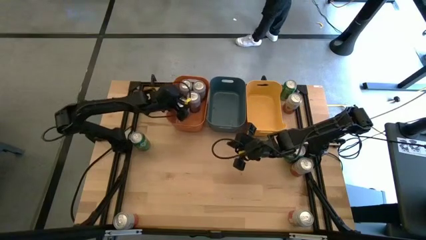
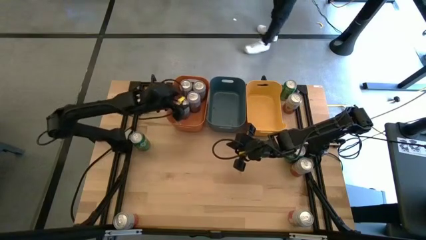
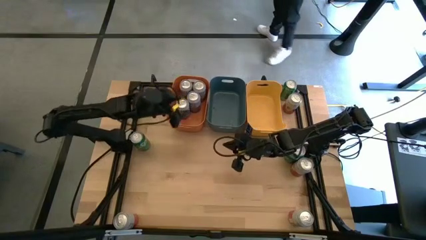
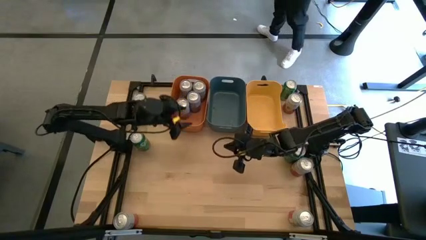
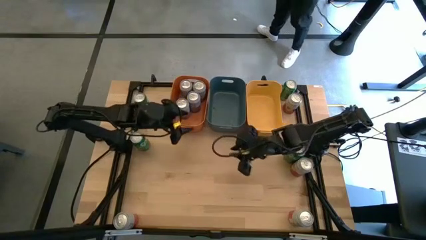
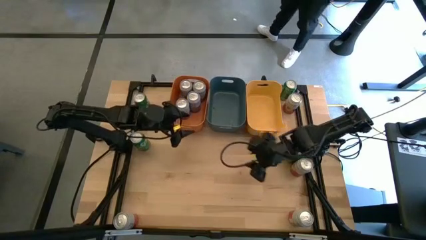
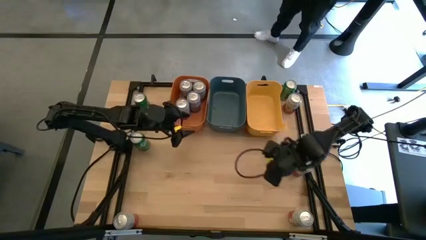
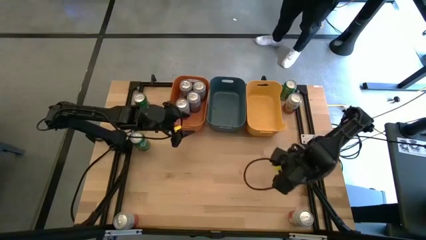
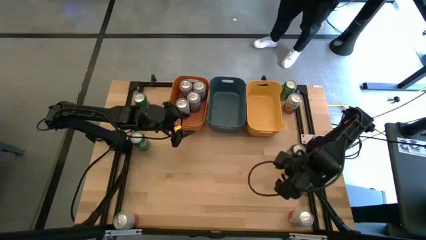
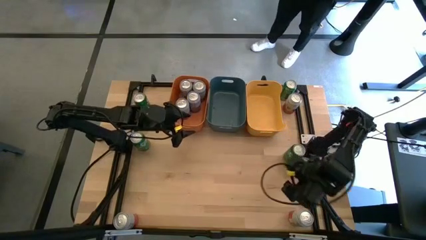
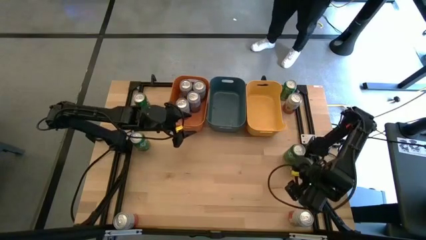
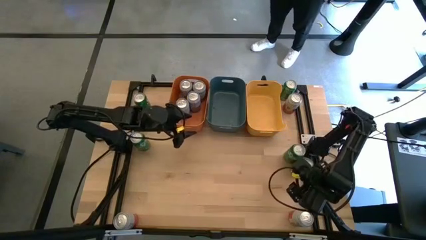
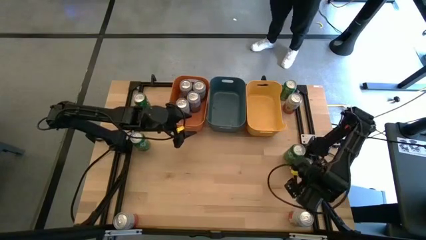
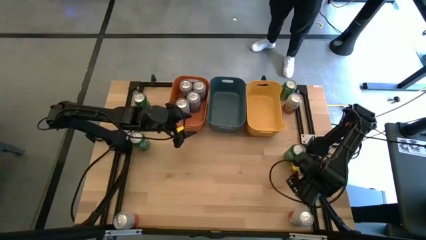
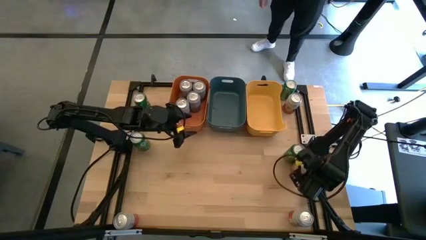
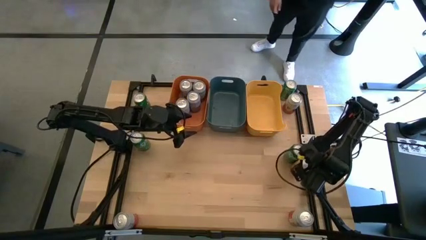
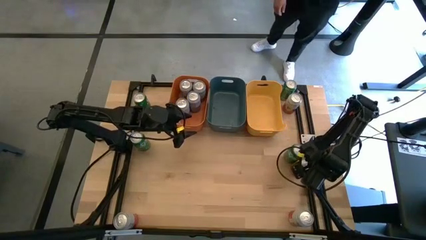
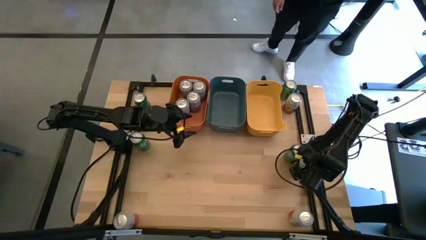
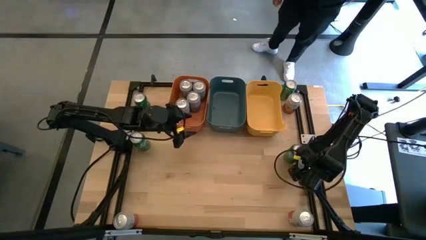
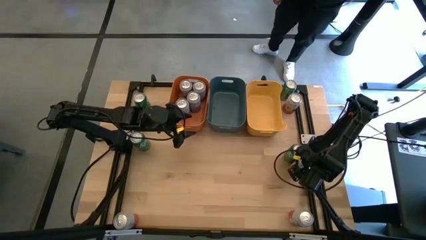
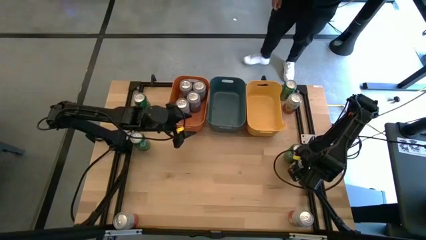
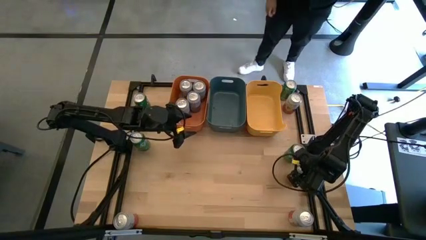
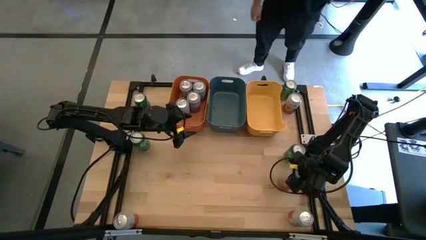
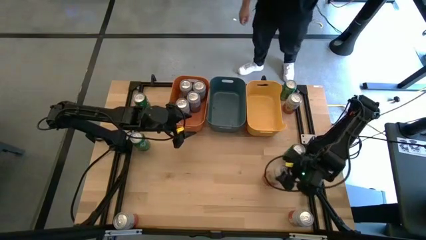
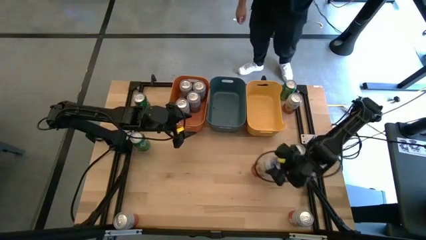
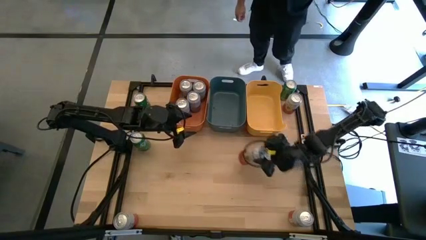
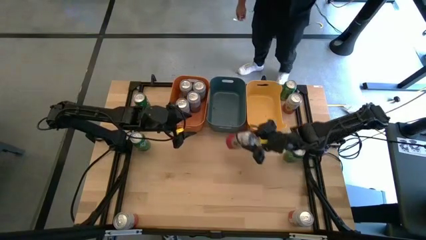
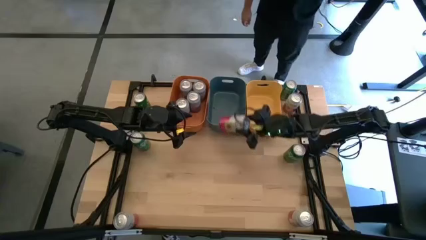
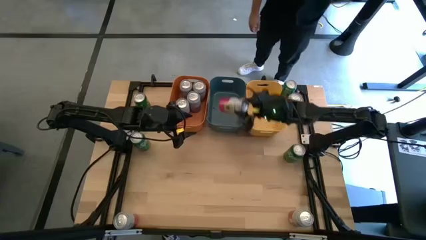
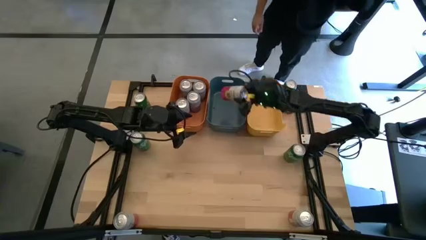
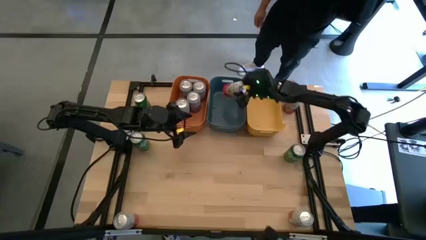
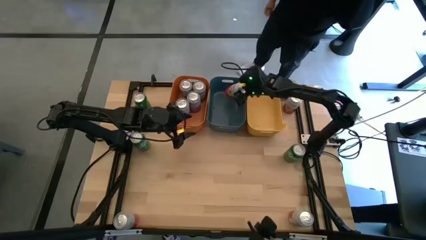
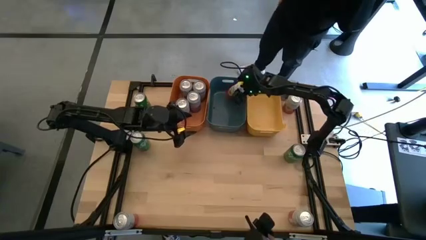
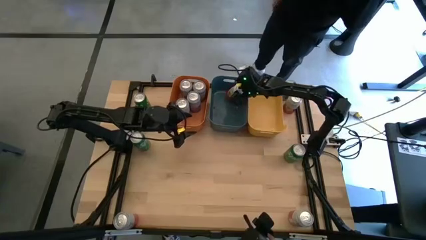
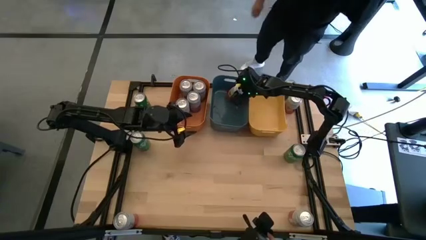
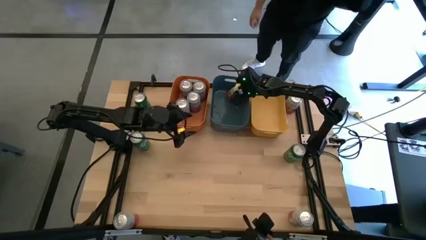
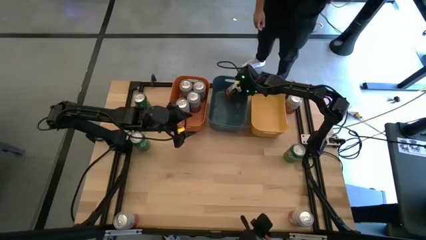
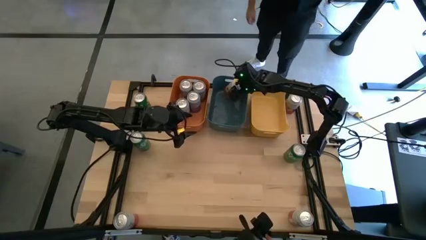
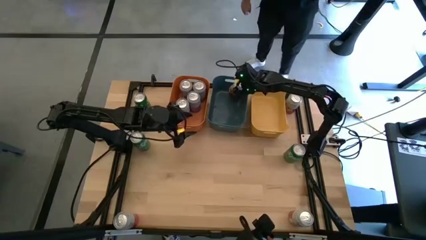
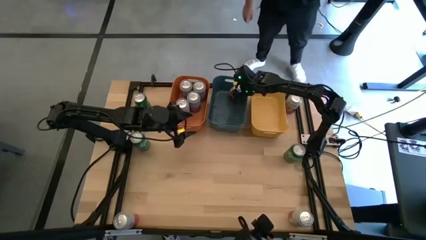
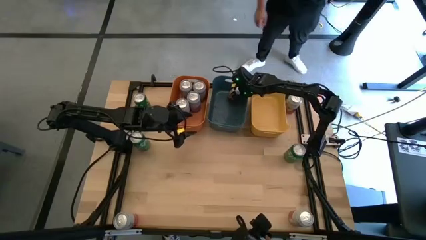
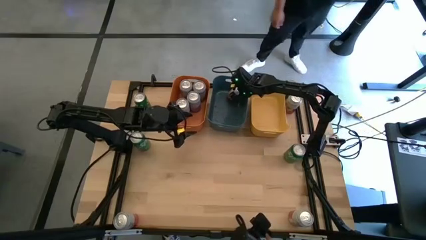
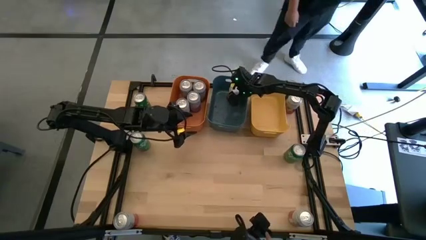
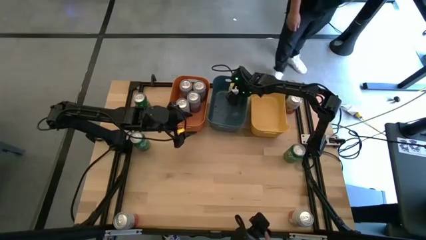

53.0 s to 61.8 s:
Task: Sort soda cans
Put the middle right pink-white soda can into the blue bin

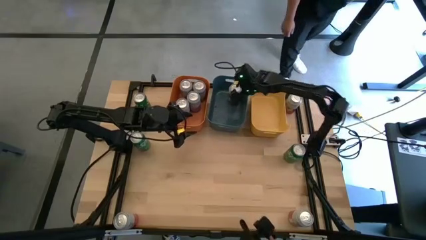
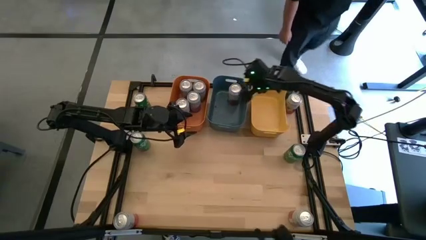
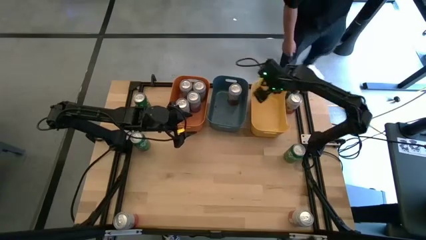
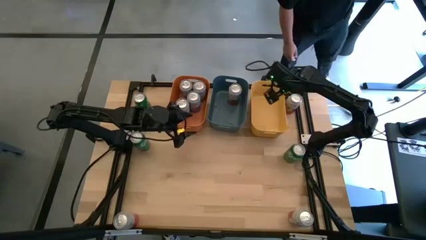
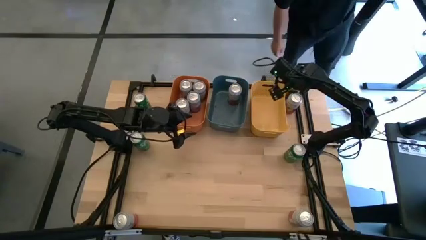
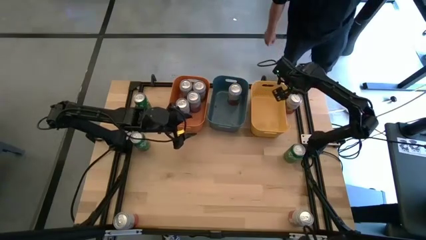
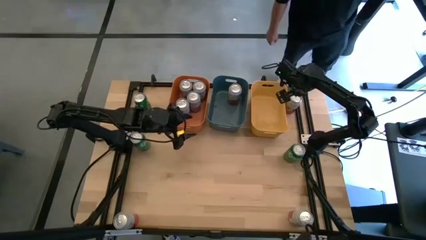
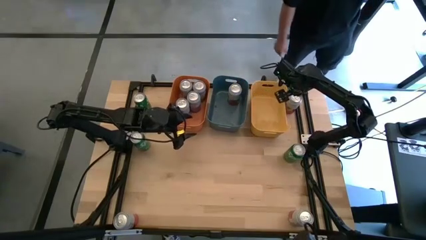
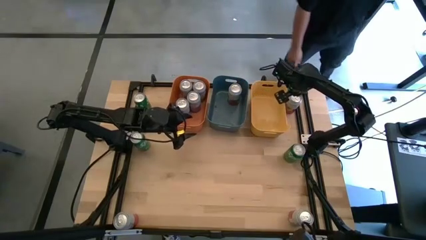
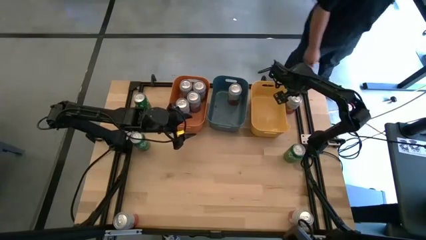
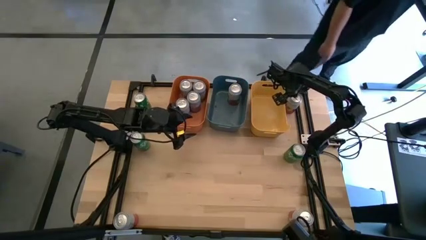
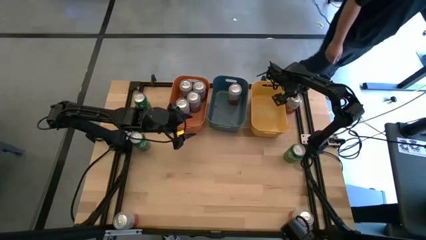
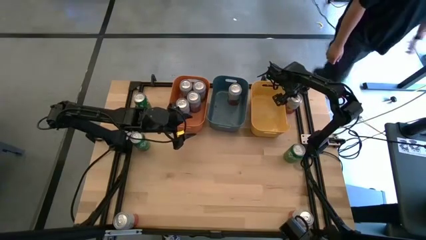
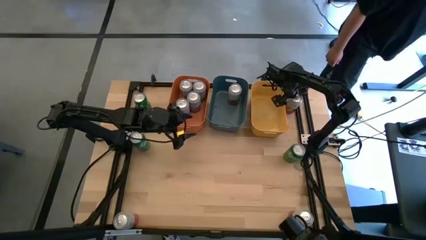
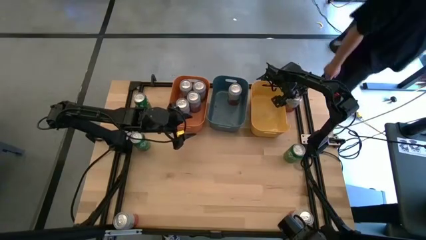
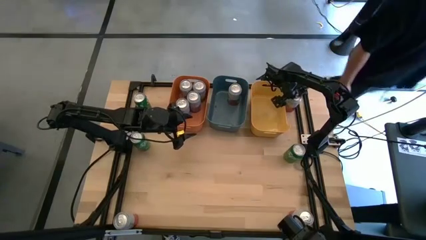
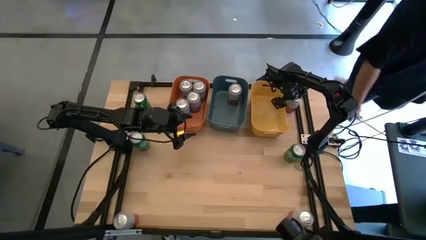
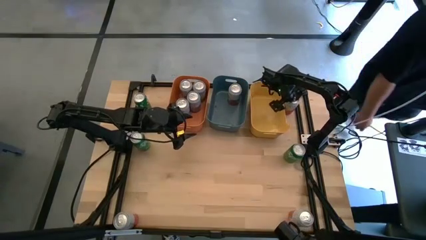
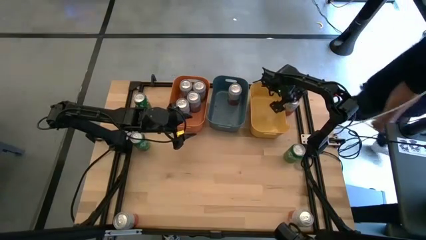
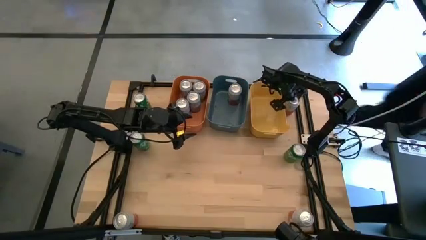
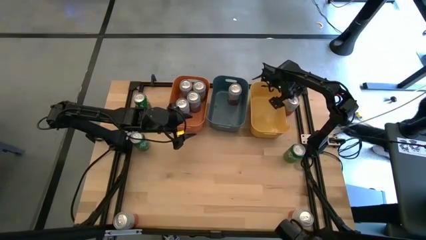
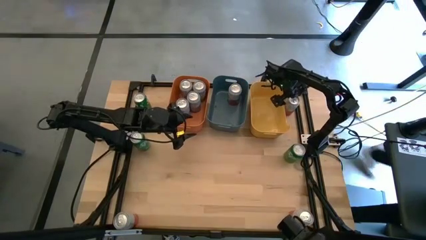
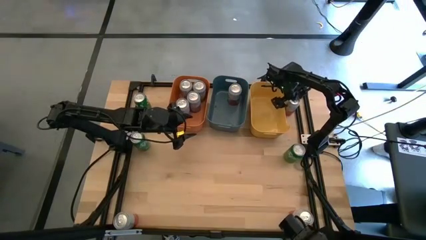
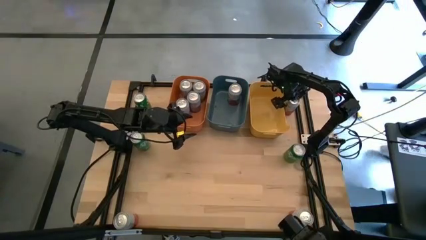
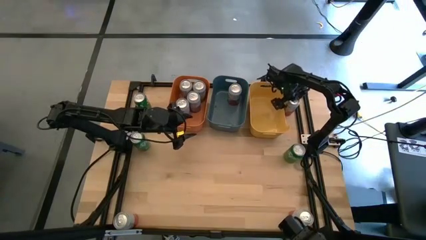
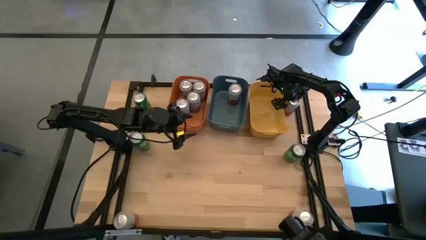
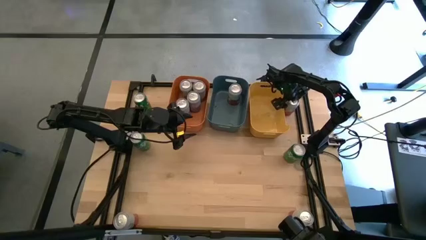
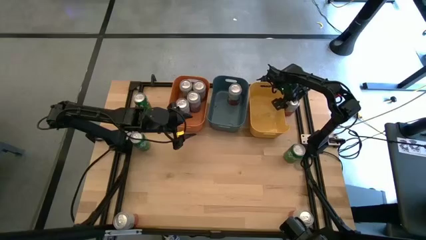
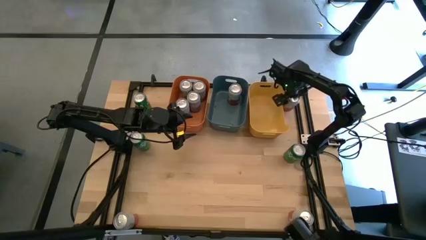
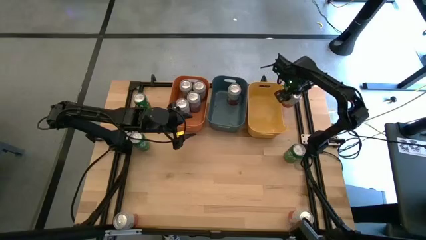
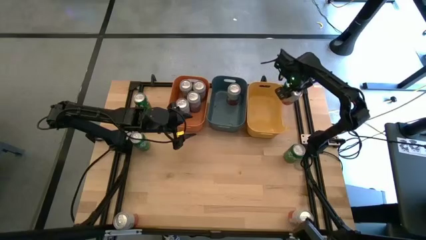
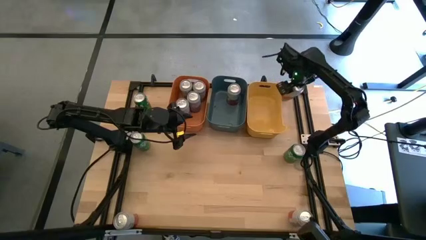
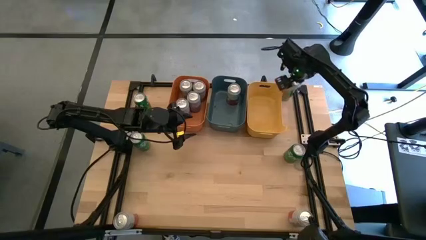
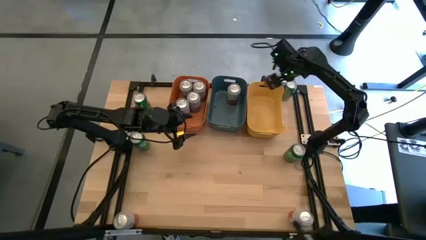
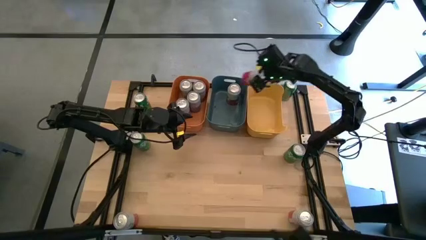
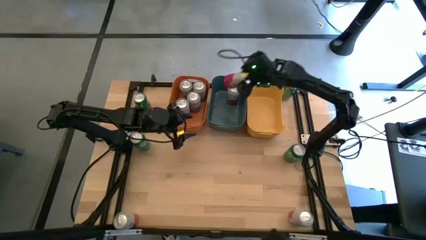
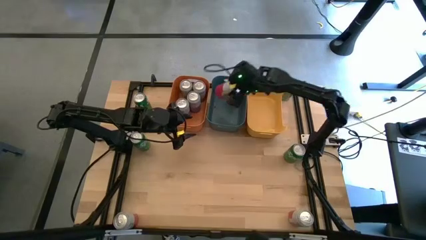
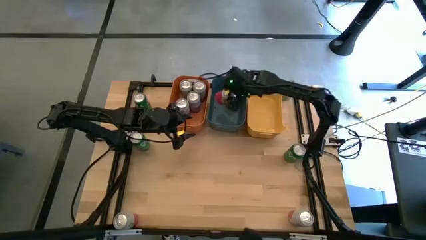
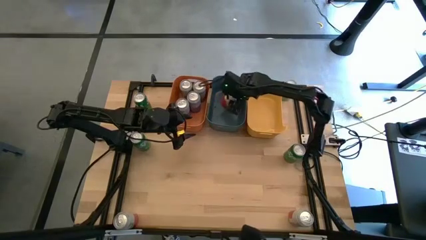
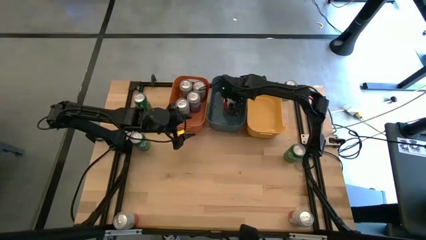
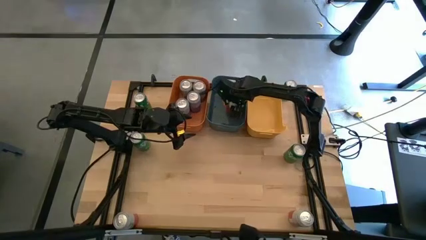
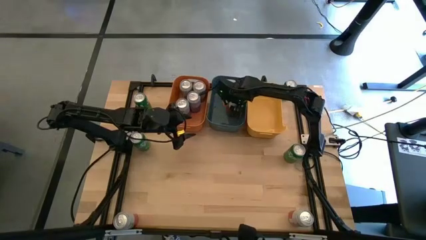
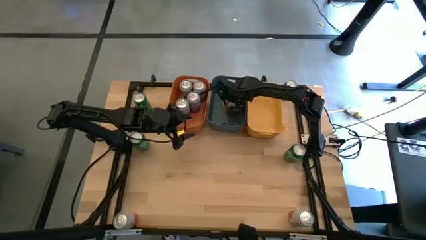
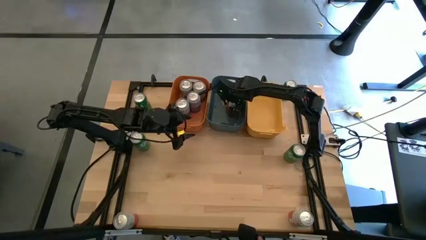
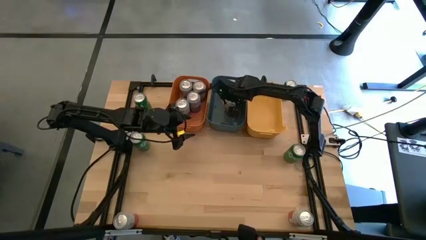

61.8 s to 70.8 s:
Put the top right pink-white soda can into the blue bin
